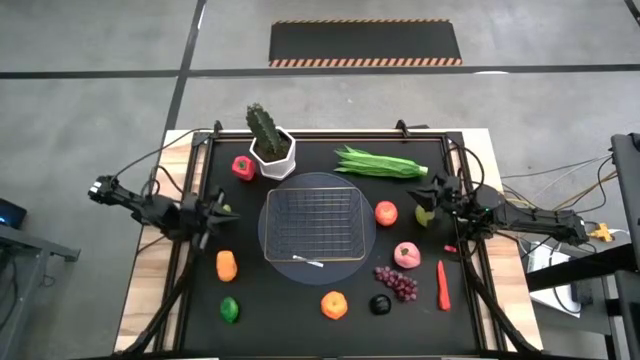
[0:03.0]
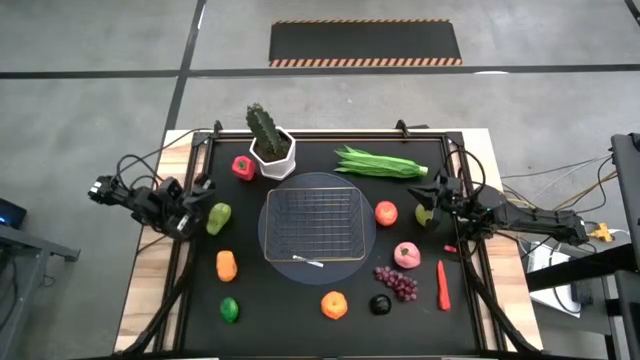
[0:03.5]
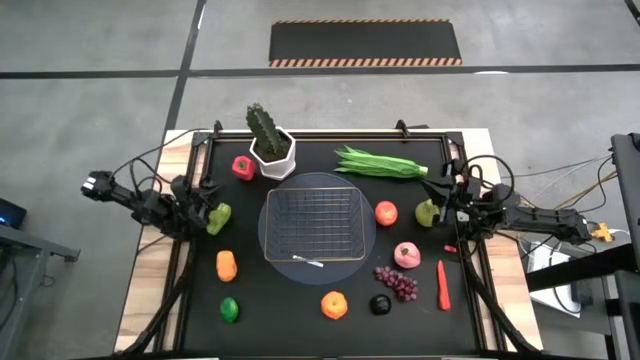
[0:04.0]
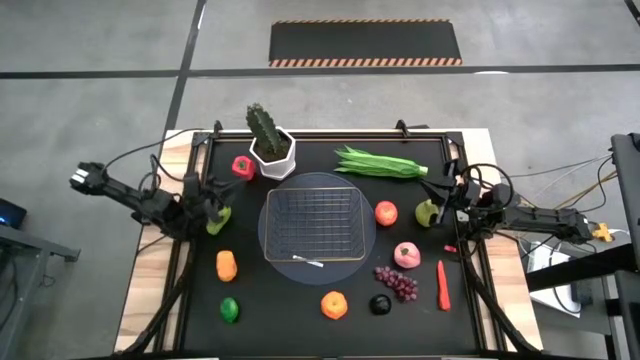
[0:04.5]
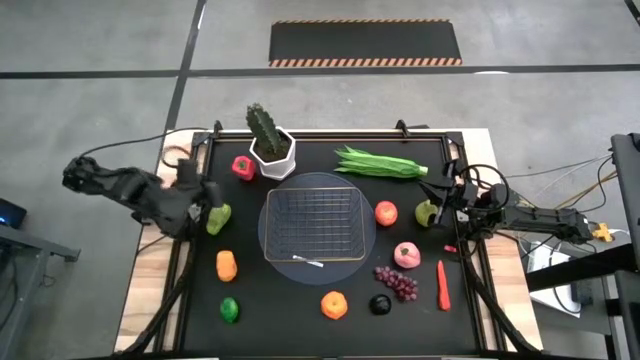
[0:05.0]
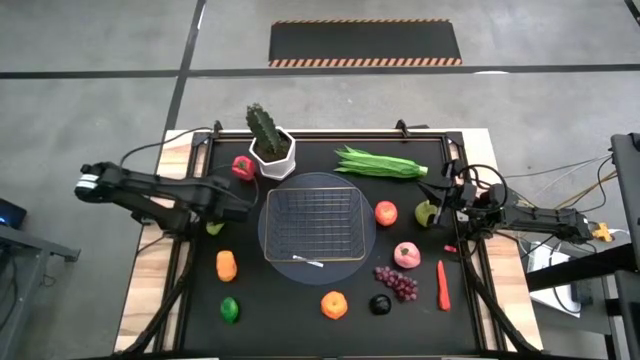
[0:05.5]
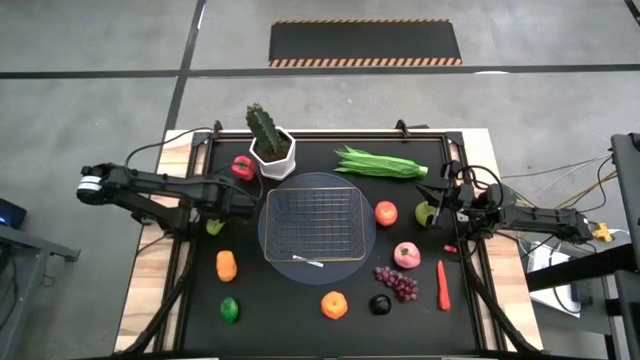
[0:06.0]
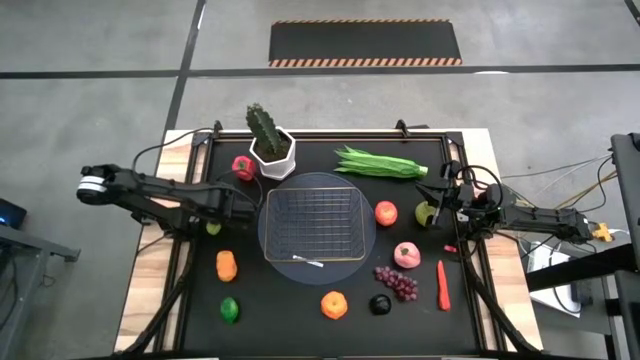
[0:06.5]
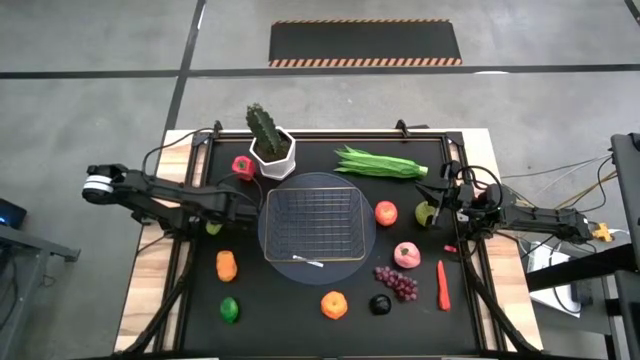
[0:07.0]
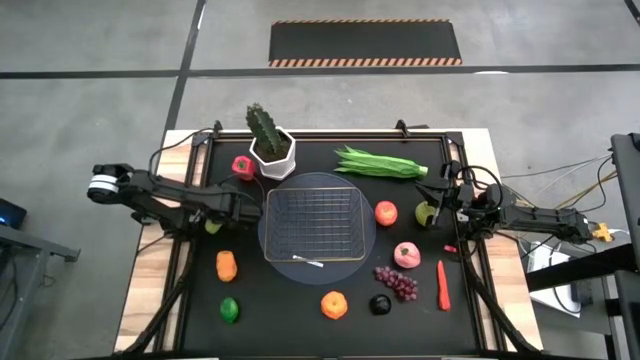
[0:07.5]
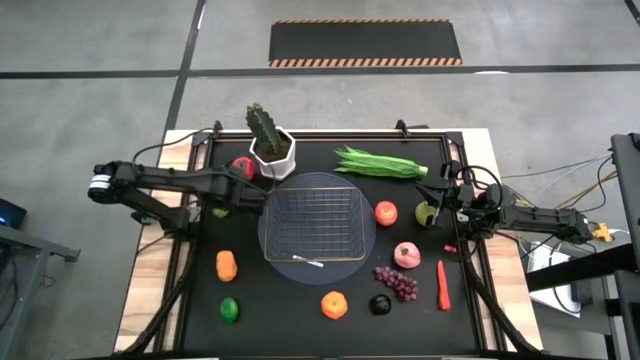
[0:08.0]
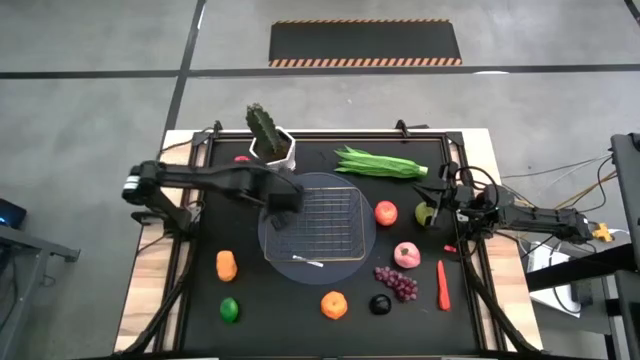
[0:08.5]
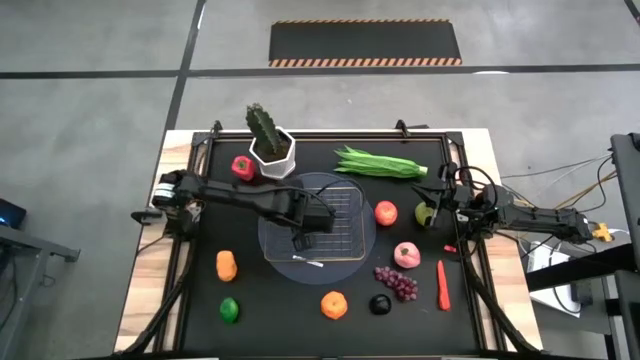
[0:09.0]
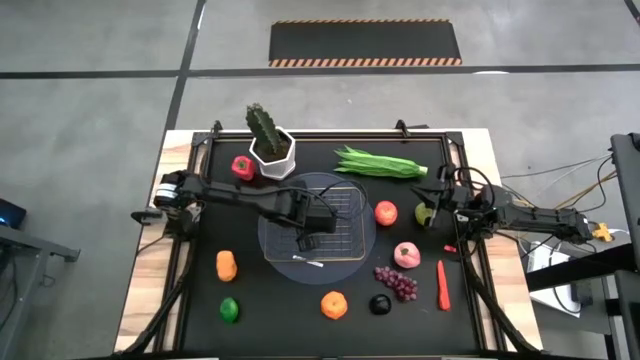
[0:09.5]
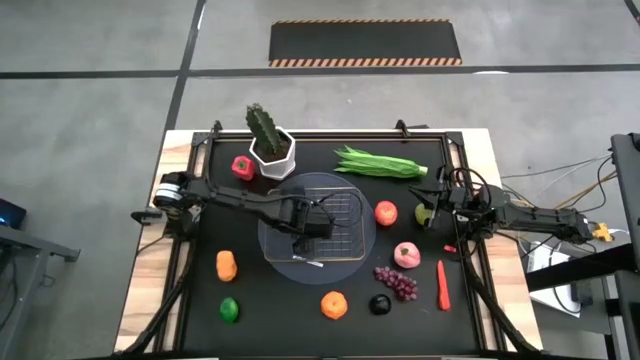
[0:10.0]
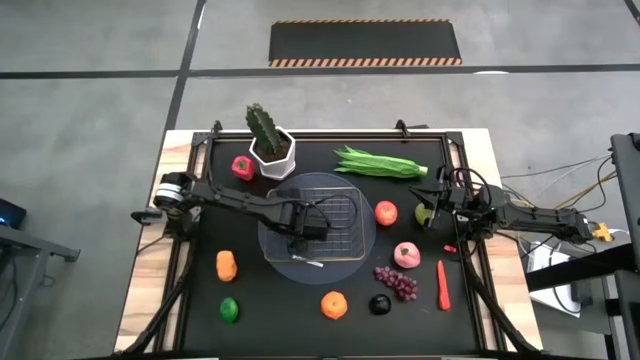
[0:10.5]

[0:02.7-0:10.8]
Task: Build produce basket
Put the chayote into the wire basket

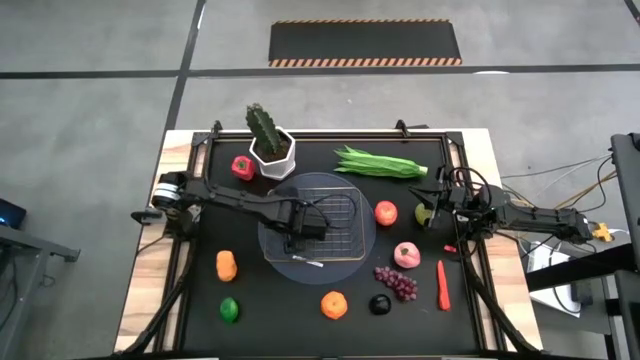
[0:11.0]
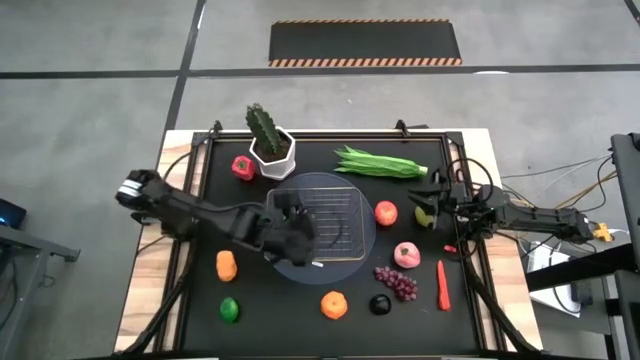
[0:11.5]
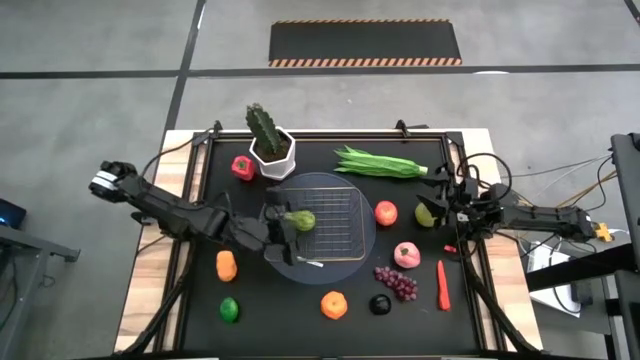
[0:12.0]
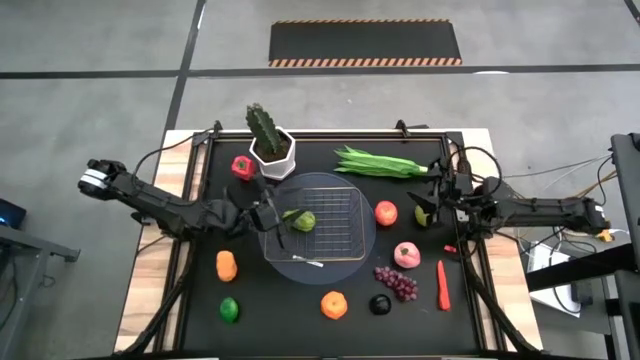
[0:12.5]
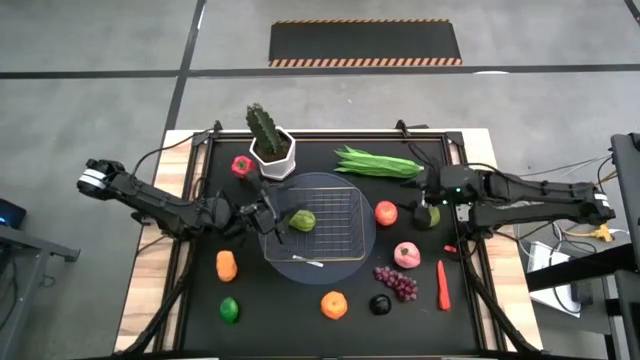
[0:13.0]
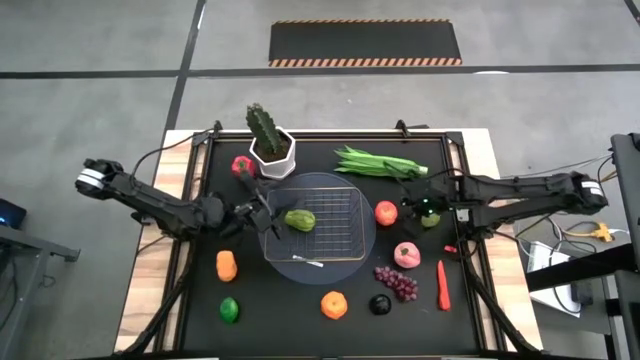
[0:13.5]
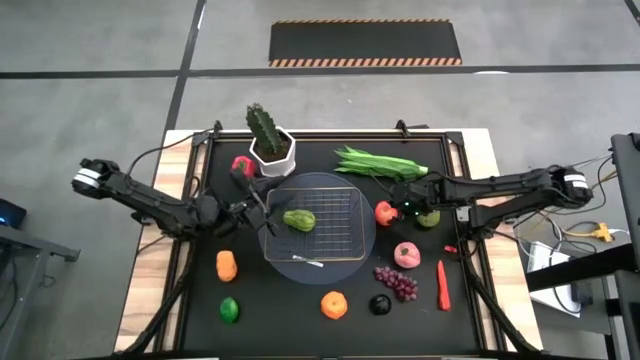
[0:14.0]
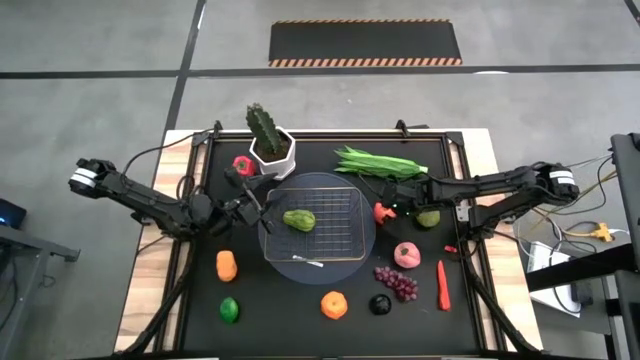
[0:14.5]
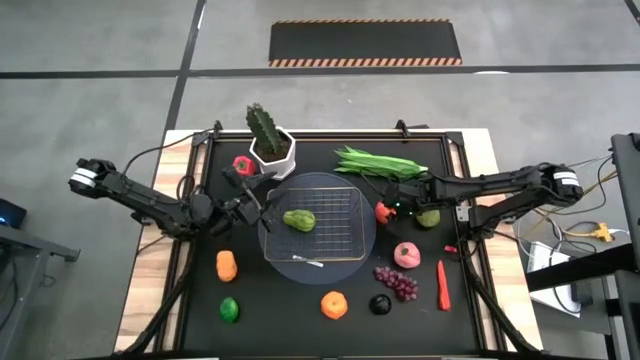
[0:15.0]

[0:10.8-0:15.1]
Put the apple into the wire basket

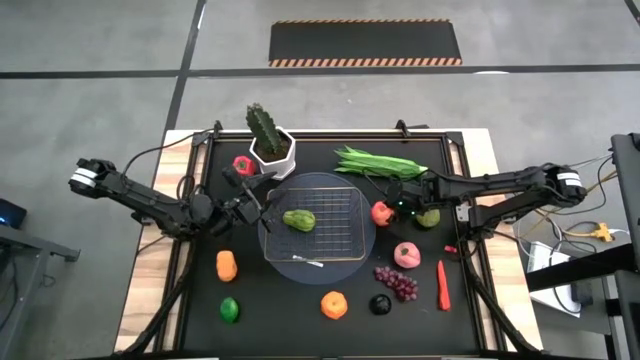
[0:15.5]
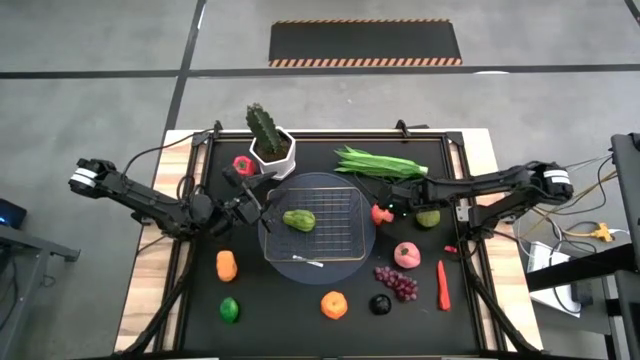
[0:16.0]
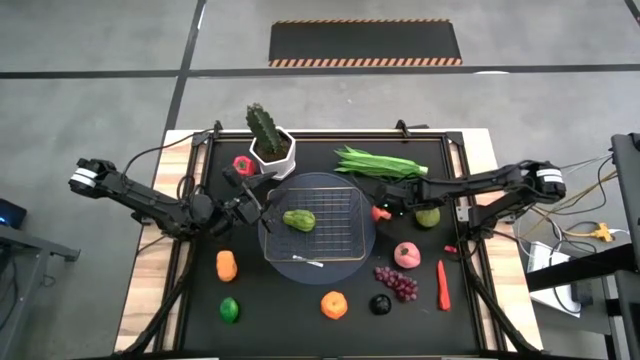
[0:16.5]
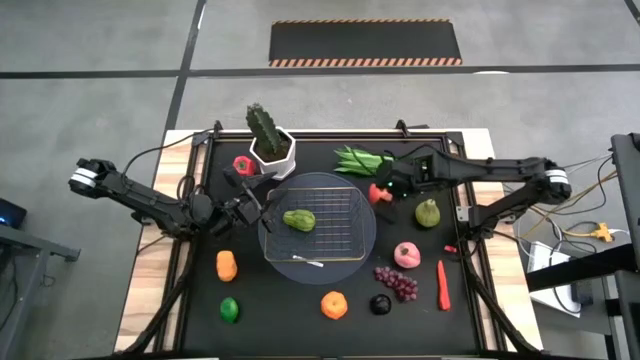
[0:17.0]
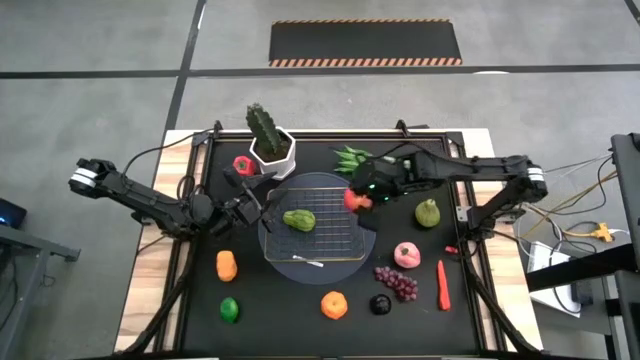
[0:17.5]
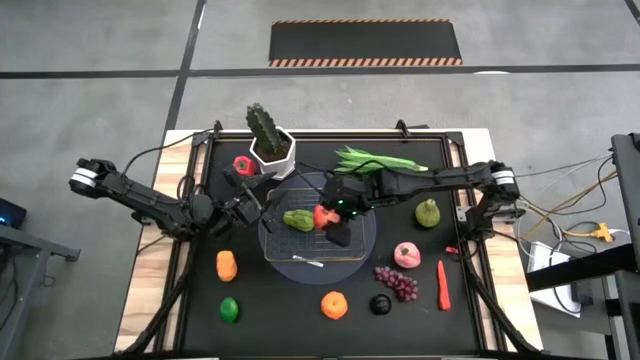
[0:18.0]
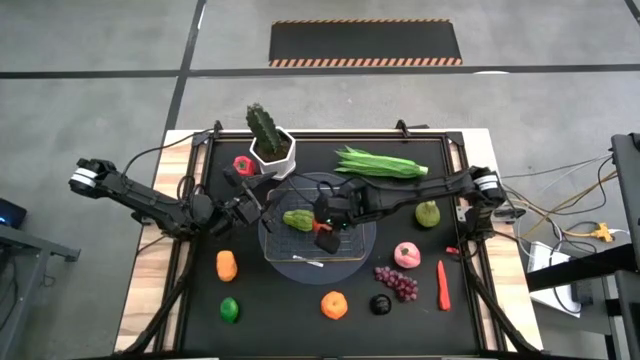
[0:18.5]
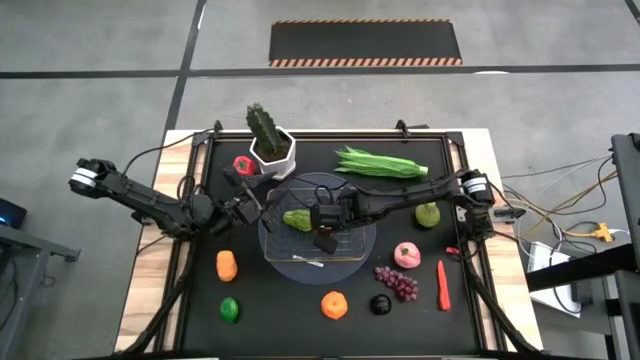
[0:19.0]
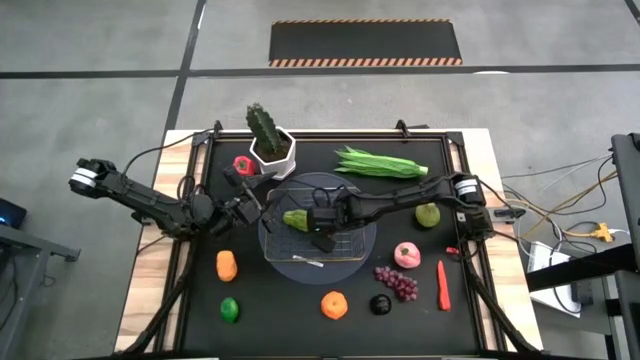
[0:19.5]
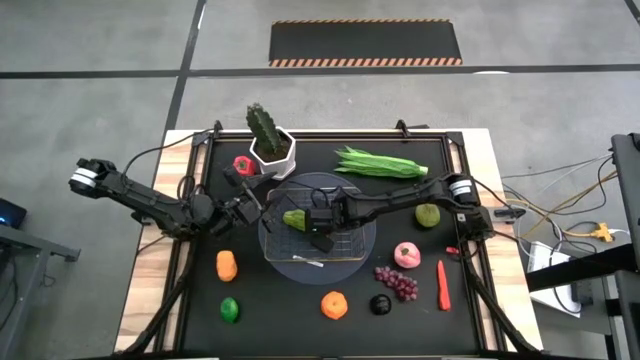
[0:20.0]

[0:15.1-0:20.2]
Put the apple into the wire basket

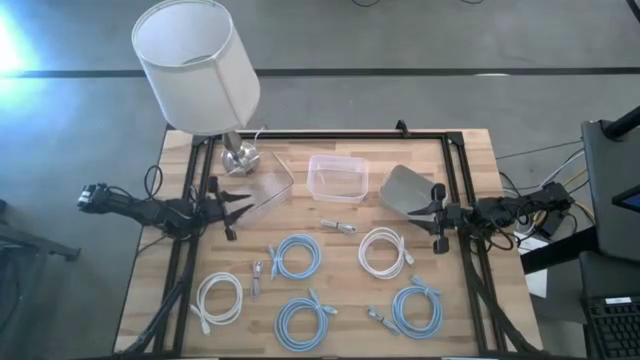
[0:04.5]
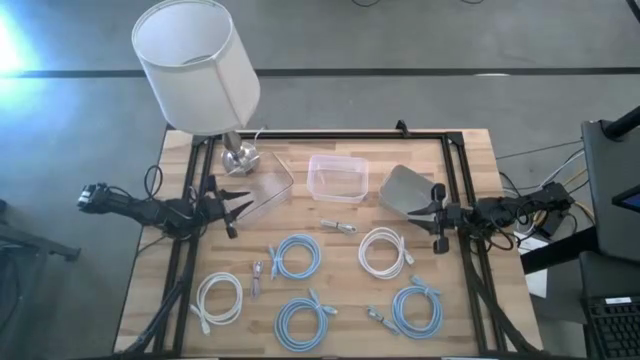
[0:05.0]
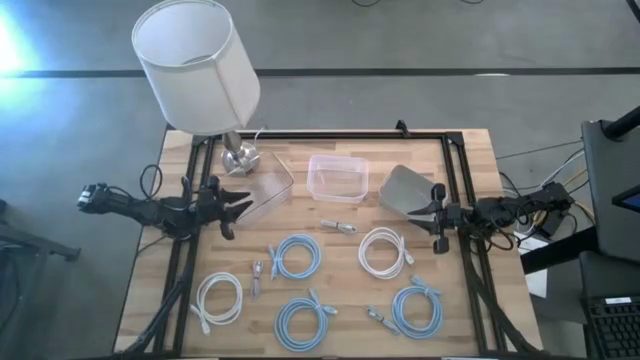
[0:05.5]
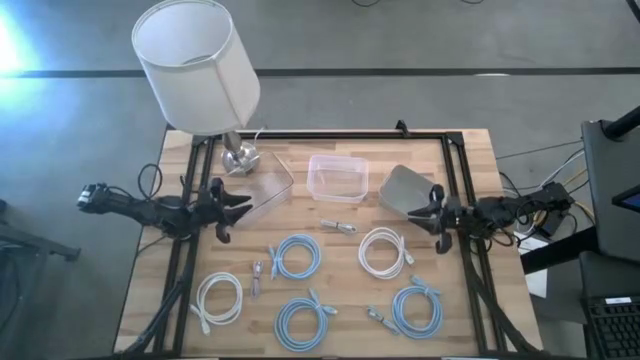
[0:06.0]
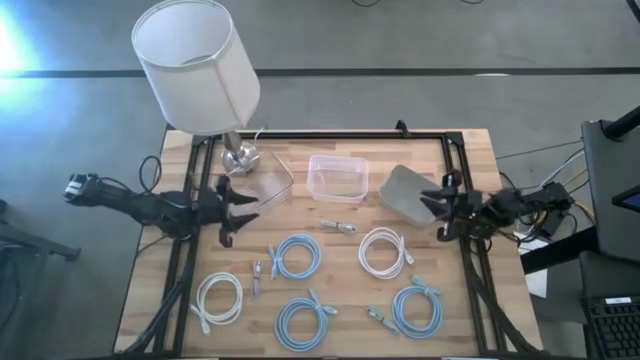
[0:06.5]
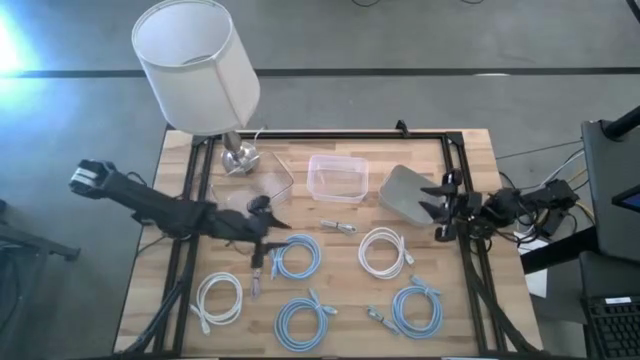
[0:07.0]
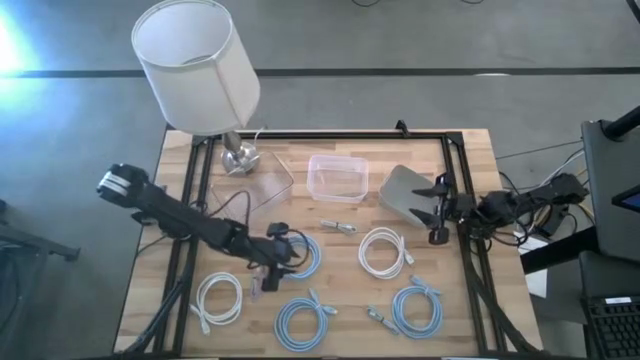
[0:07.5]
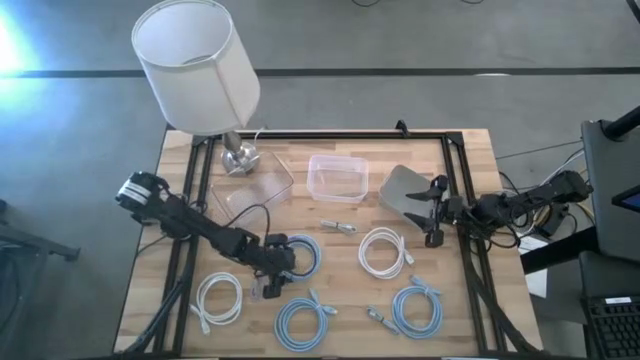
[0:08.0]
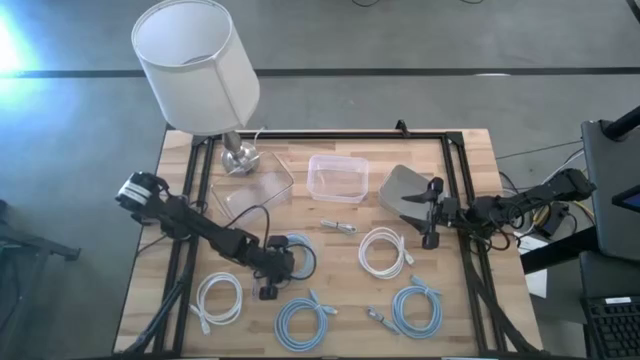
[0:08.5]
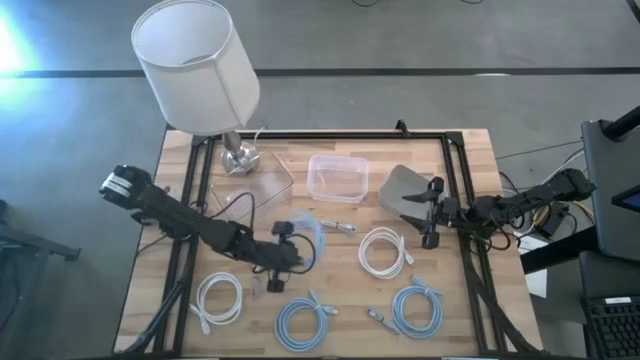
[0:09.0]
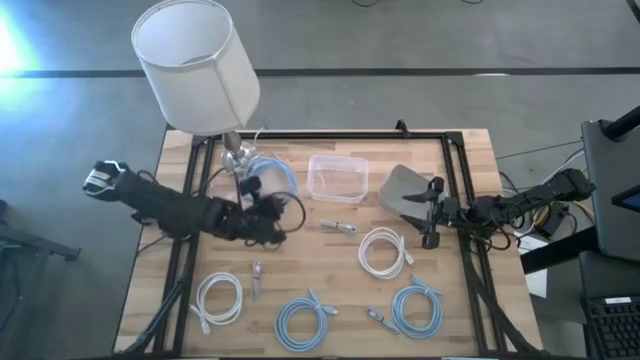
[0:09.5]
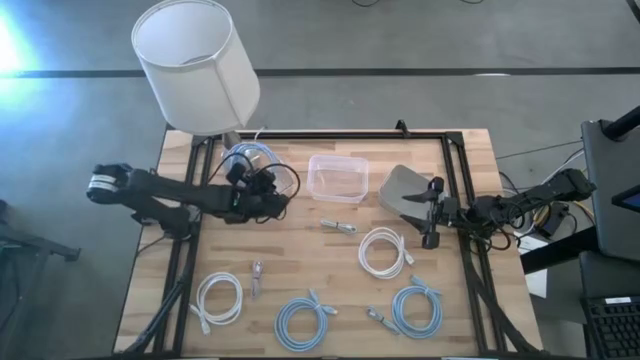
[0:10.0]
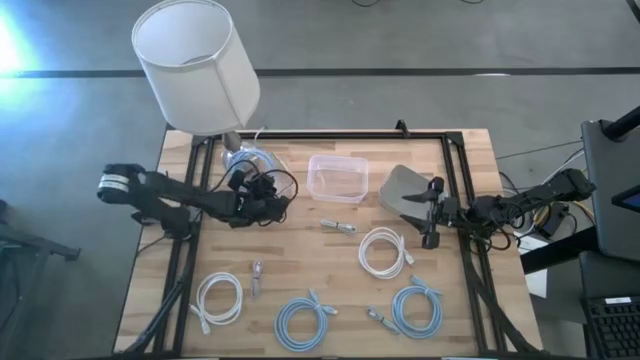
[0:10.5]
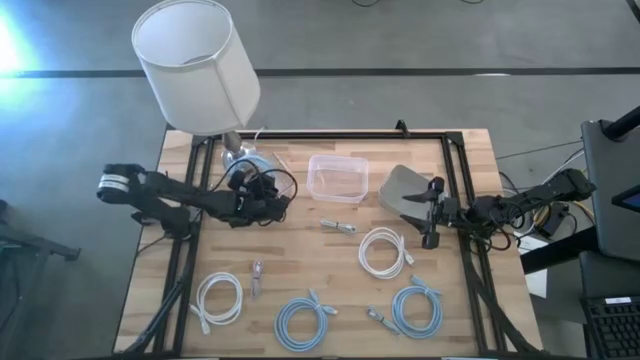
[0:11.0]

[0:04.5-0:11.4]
Task: Pick & Place USB Port
Put the top blue HDMI cable into the left transparent bin
